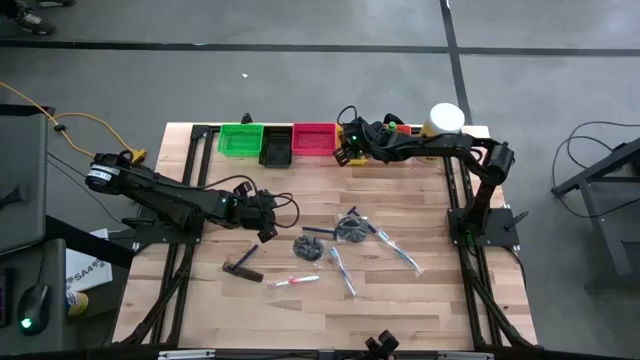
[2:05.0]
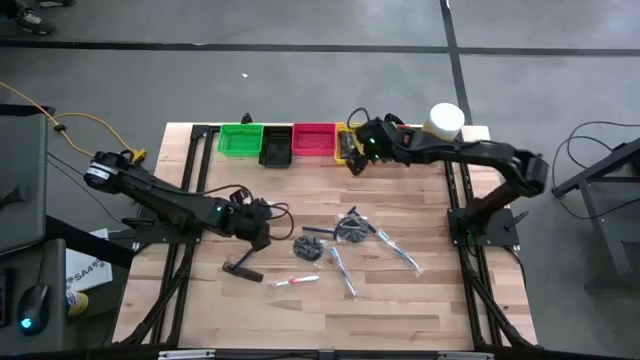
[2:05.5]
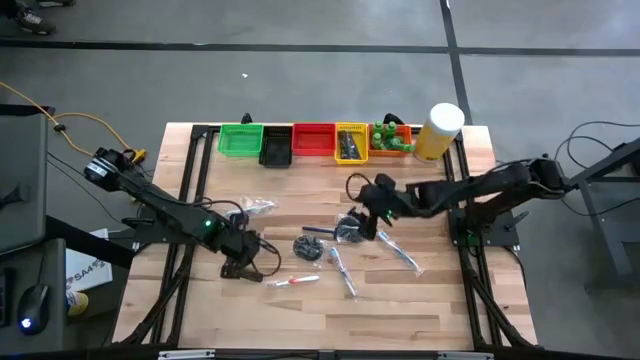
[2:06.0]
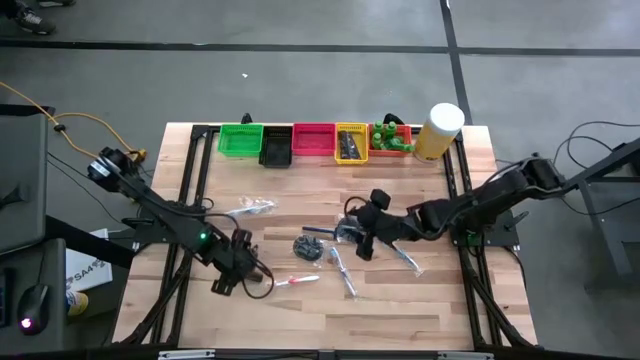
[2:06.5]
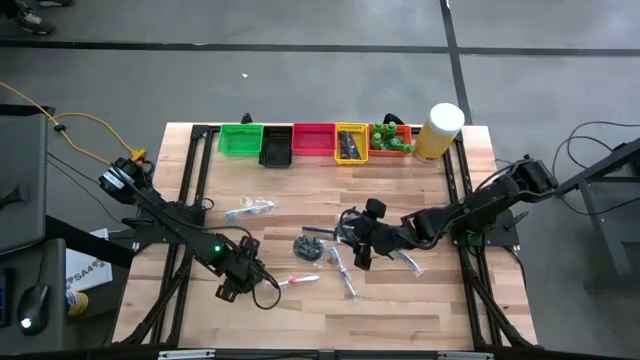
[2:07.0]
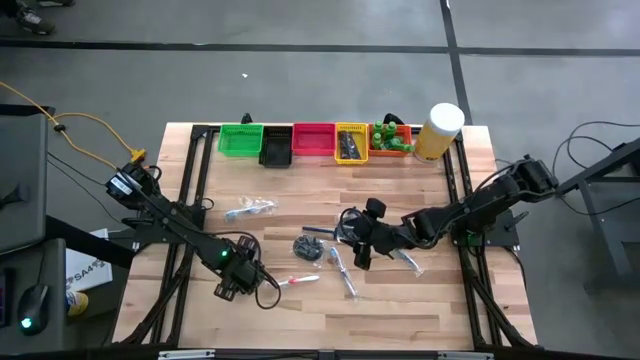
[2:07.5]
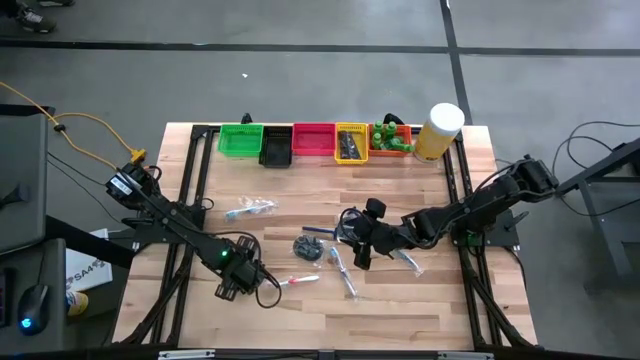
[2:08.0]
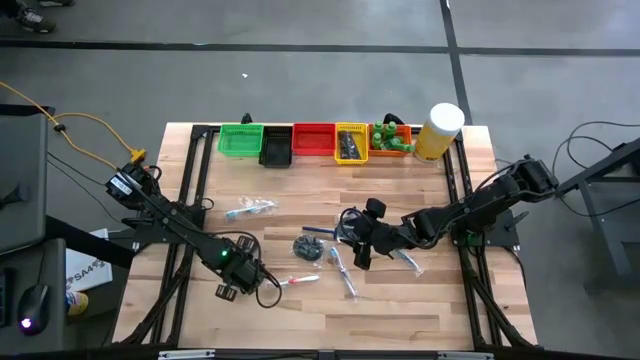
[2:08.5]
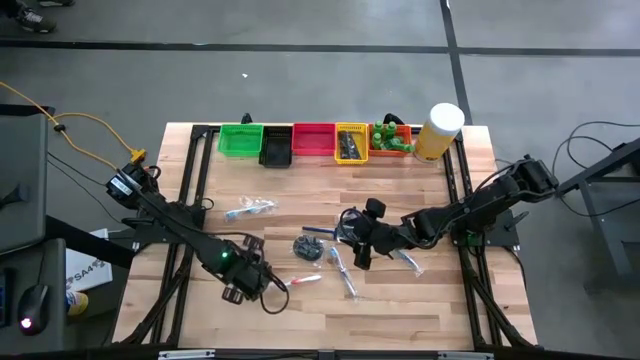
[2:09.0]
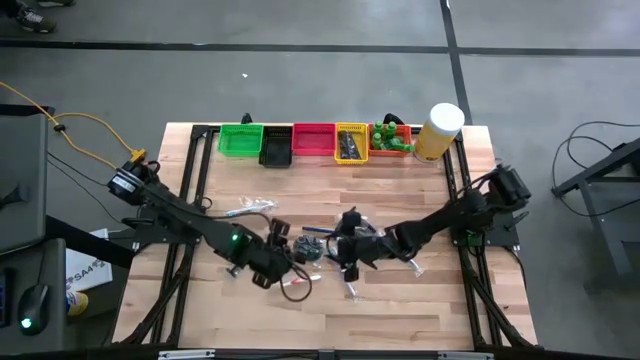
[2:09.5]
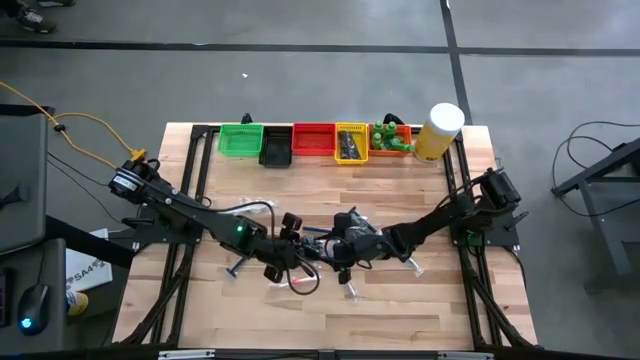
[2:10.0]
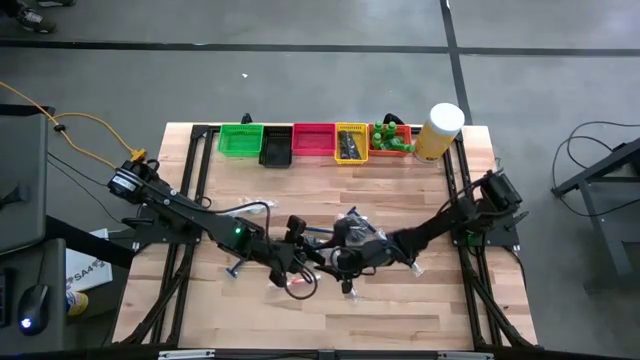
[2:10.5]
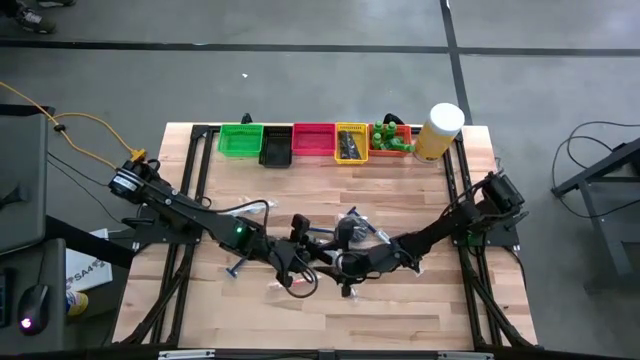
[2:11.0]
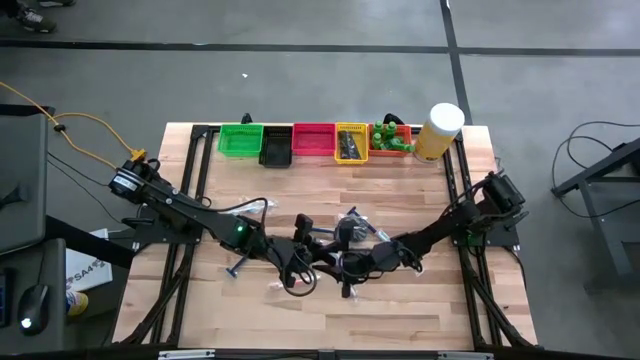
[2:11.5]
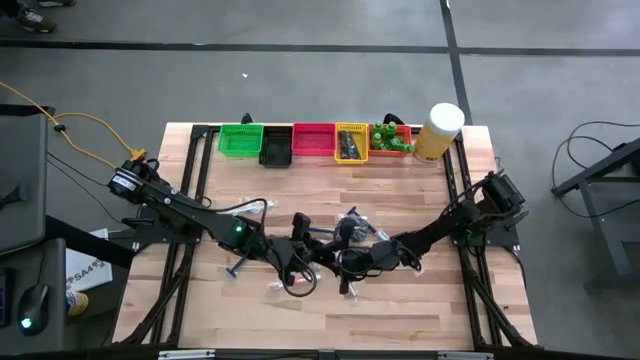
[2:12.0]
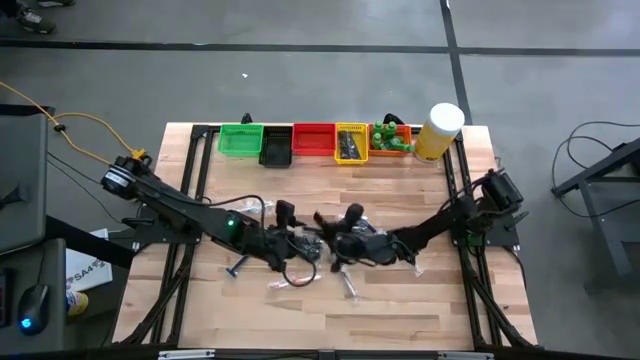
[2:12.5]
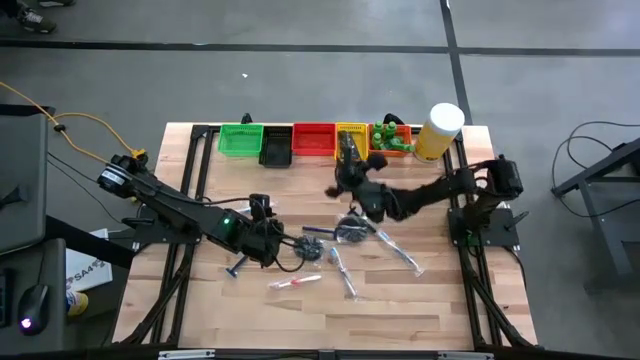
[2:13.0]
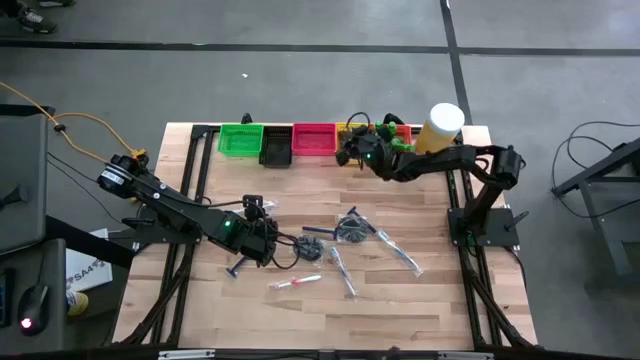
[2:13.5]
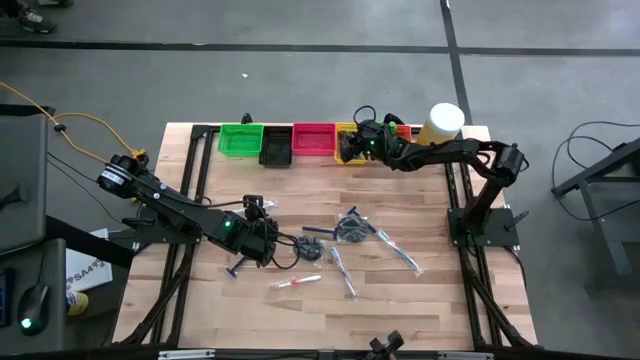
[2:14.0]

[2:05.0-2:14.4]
Task: Pick & Place Travel size toiletries
Put the black hair comb into the yellow basket

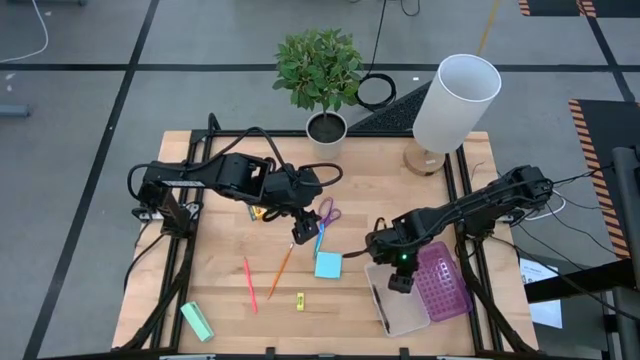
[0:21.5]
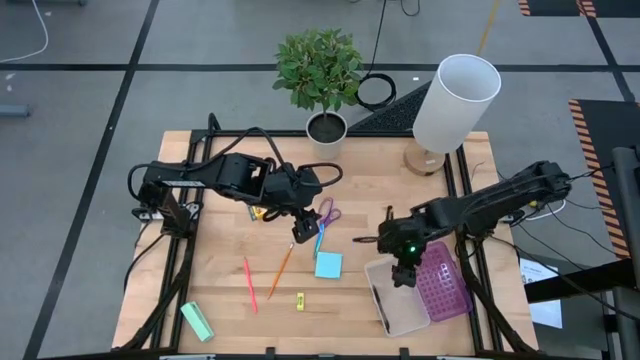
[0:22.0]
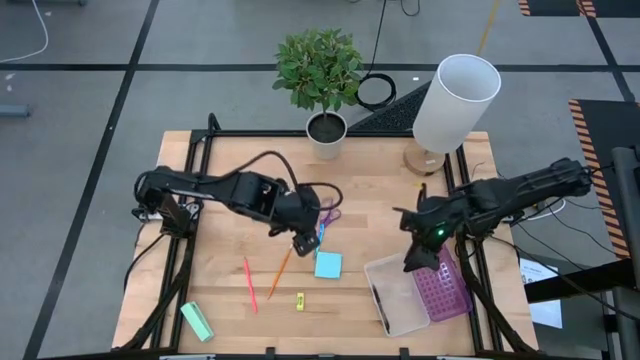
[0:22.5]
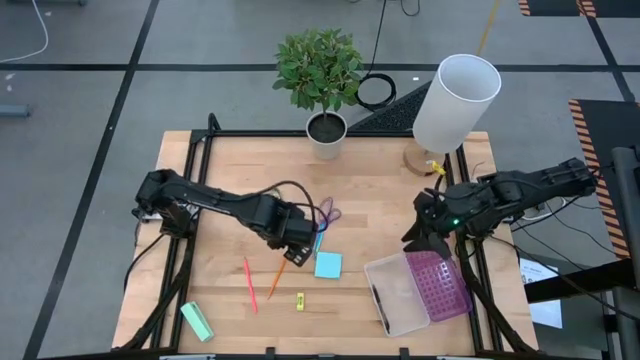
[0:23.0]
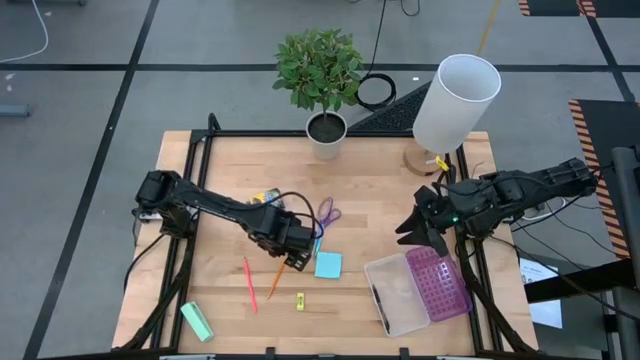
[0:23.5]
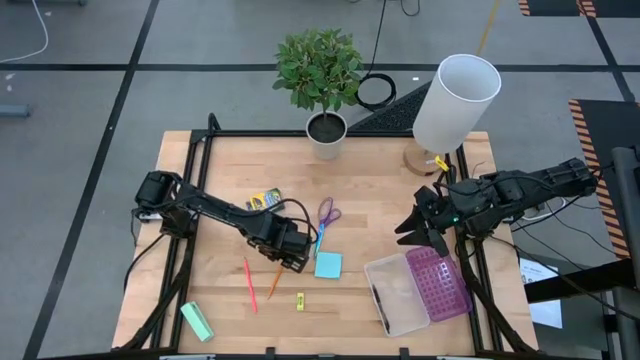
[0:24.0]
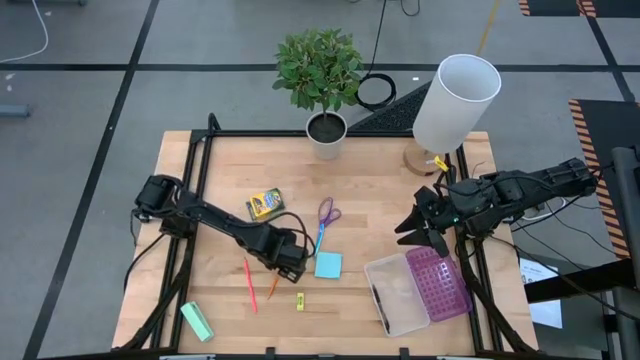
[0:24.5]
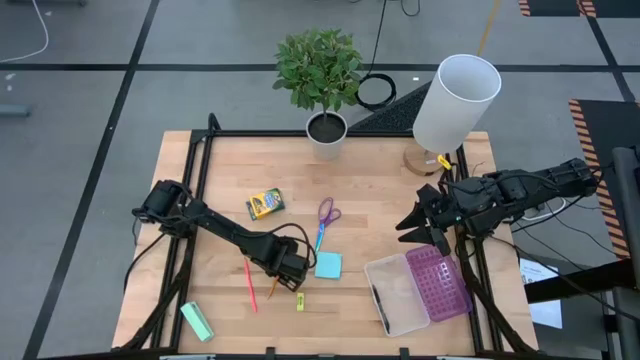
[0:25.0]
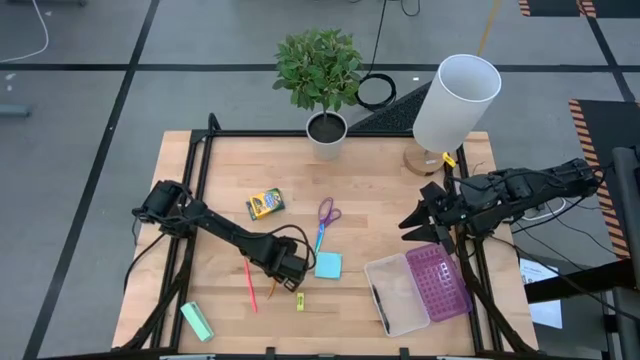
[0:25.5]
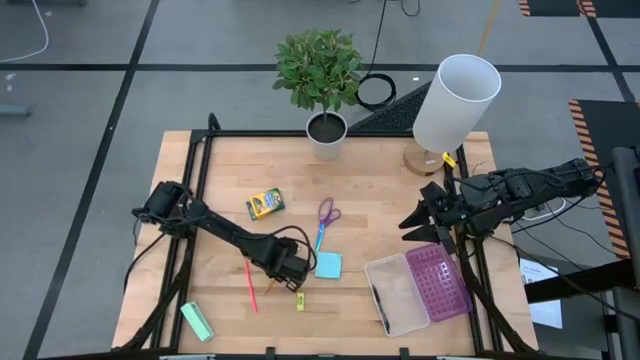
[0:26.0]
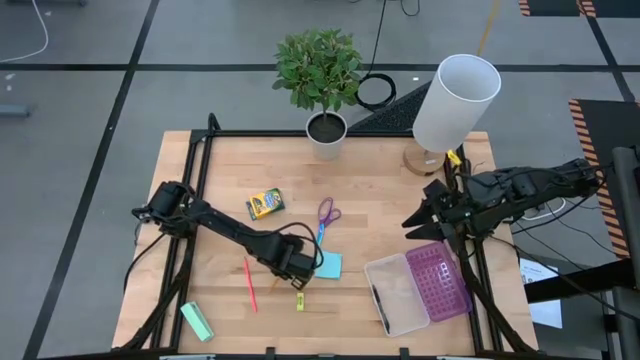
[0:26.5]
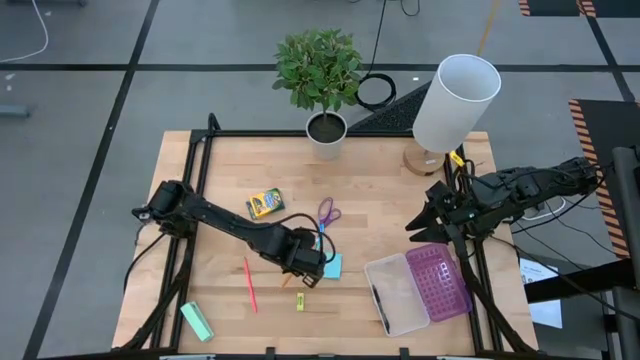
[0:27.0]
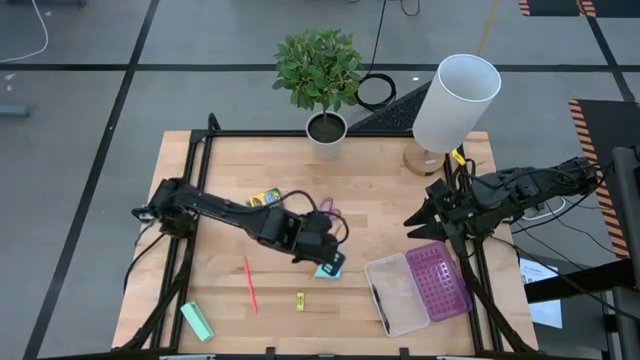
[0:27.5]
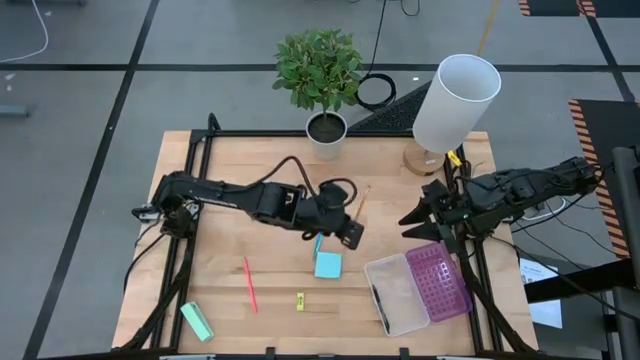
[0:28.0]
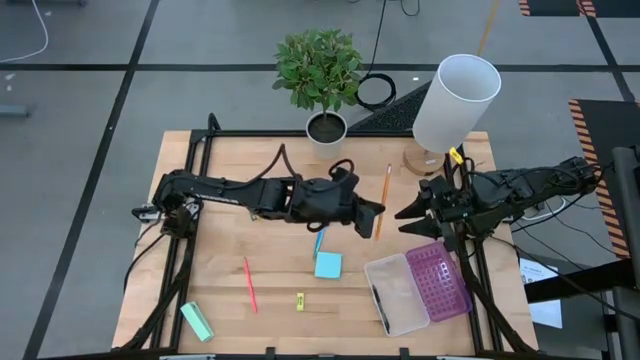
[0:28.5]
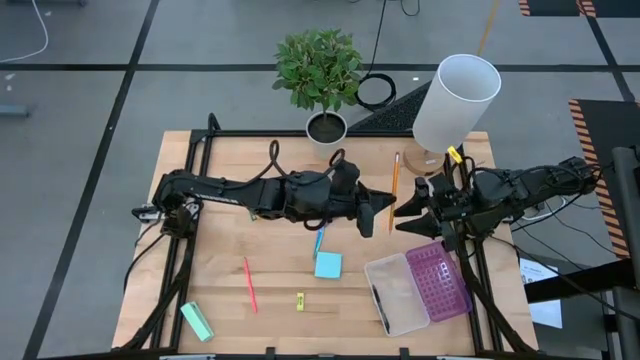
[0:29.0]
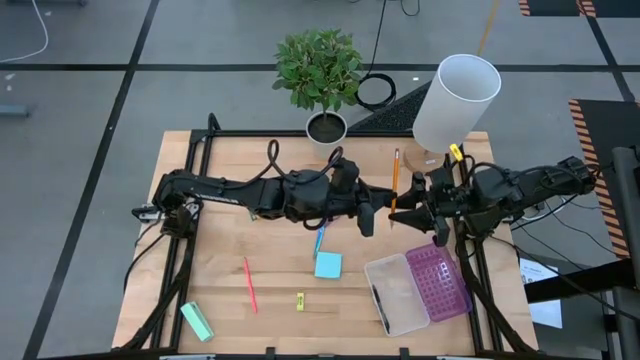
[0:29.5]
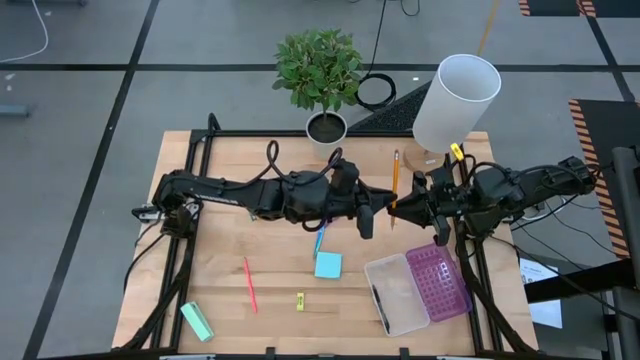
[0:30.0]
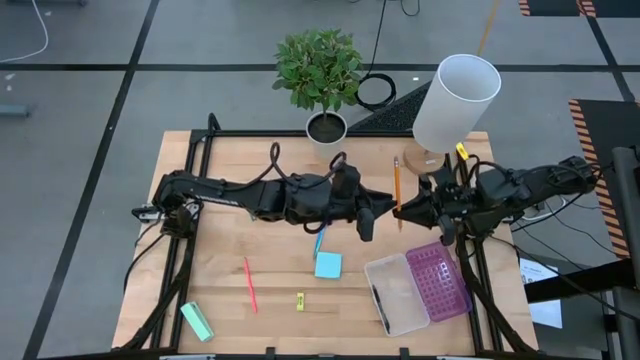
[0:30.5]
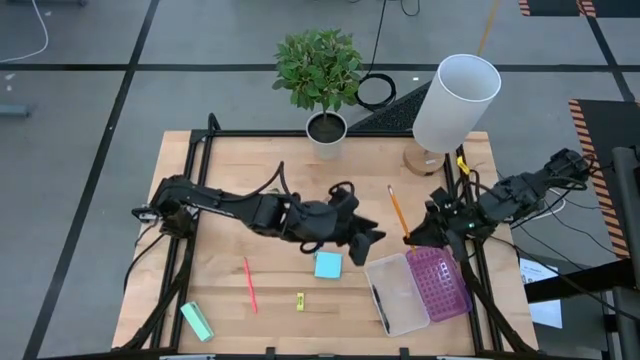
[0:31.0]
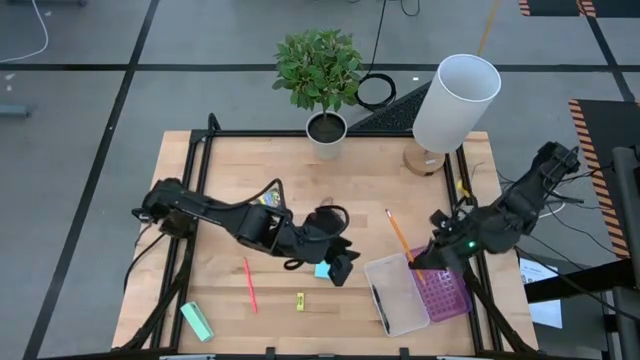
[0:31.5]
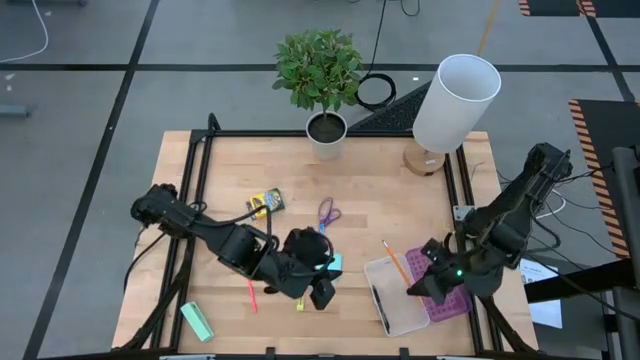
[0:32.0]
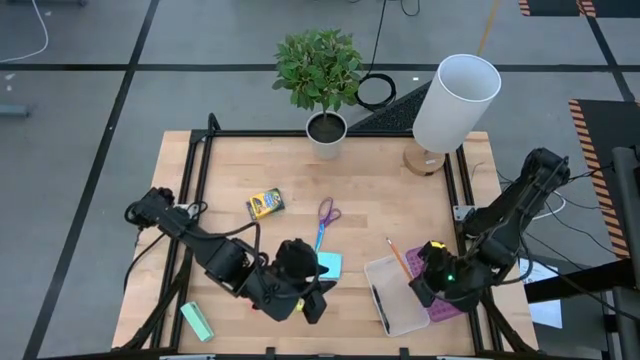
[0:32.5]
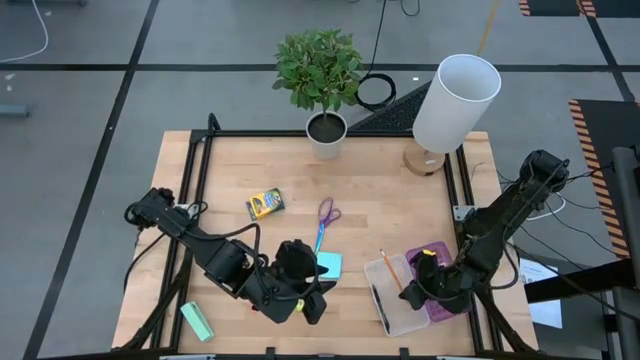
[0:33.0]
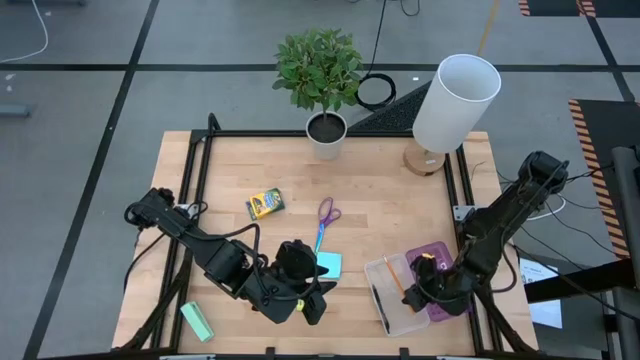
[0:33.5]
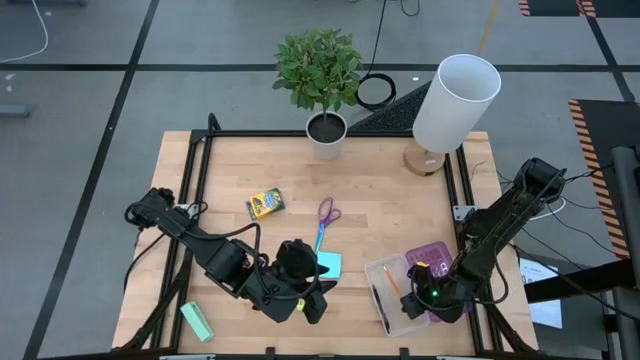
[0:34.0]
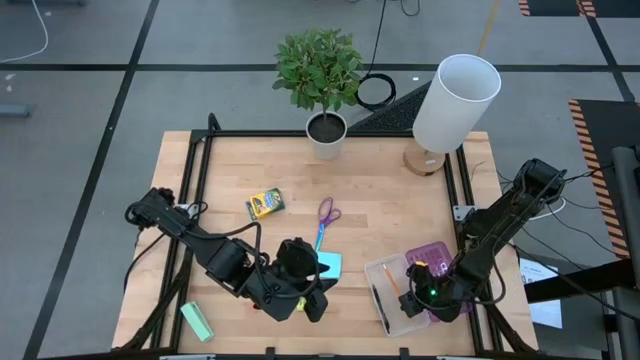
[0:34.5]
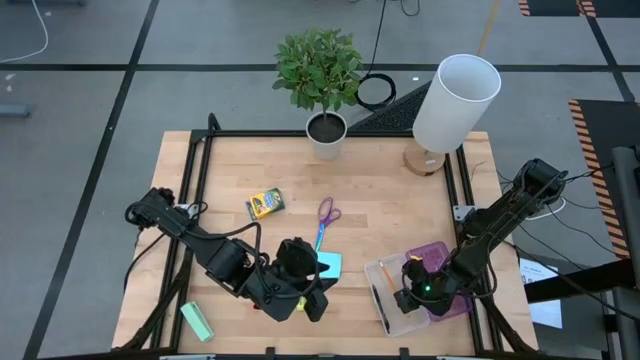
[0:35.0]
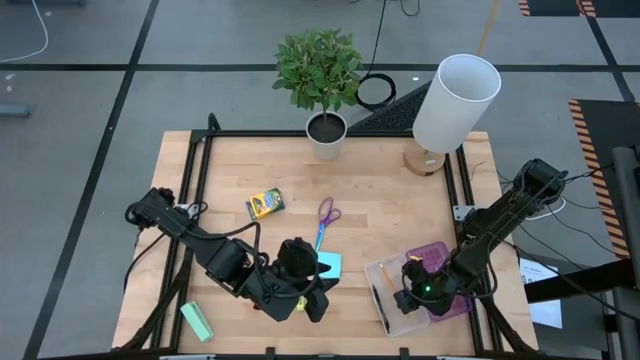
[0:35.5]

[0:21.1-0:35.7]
Task: Pack school essentials
Put the orange pencil into the purple supply box
